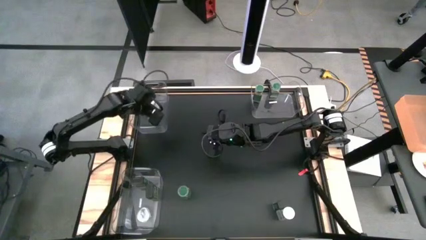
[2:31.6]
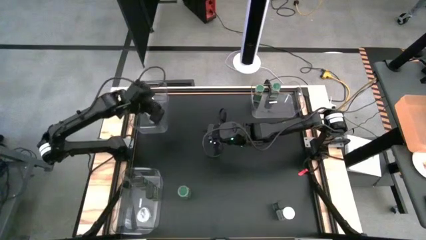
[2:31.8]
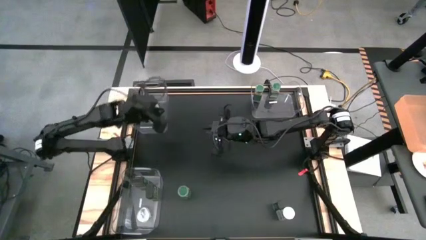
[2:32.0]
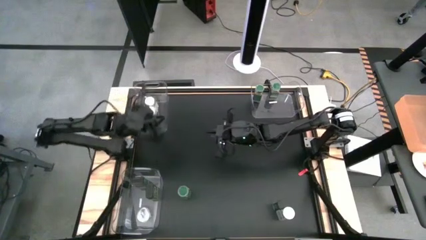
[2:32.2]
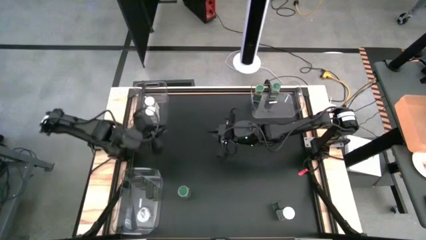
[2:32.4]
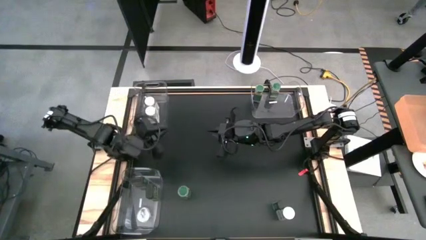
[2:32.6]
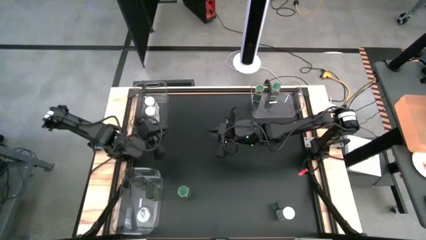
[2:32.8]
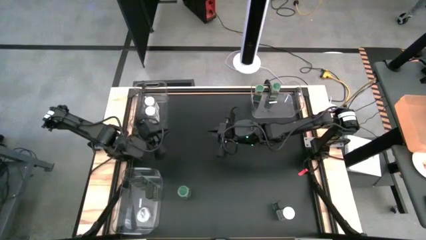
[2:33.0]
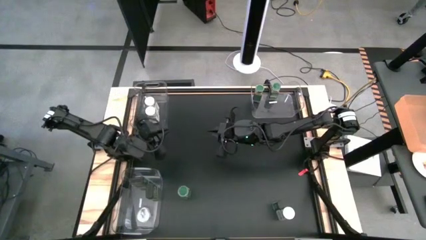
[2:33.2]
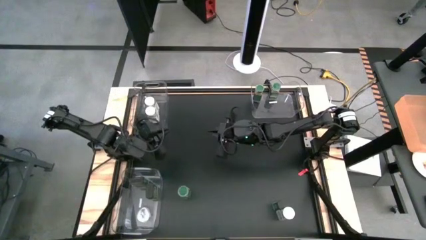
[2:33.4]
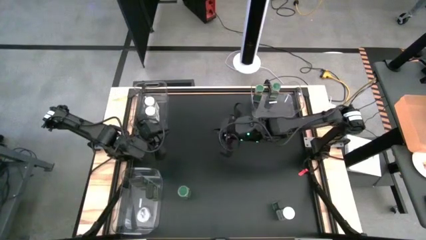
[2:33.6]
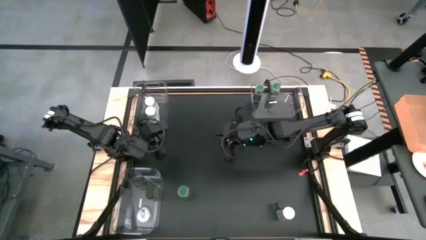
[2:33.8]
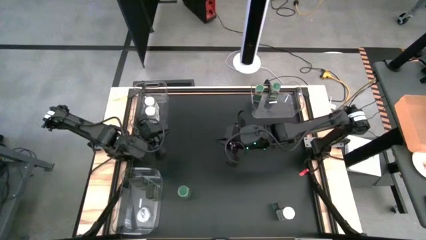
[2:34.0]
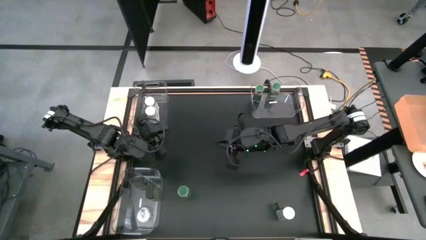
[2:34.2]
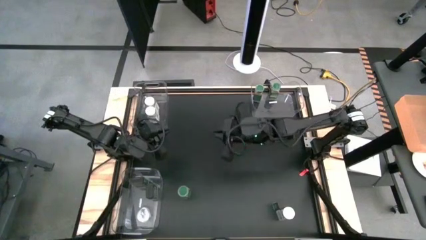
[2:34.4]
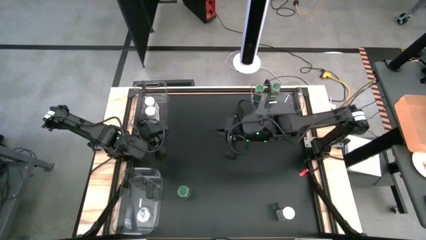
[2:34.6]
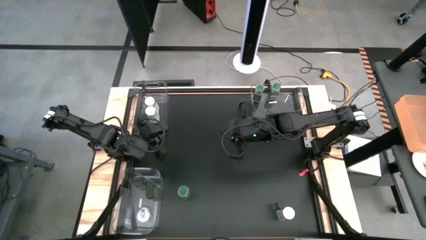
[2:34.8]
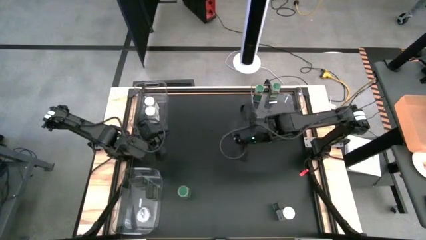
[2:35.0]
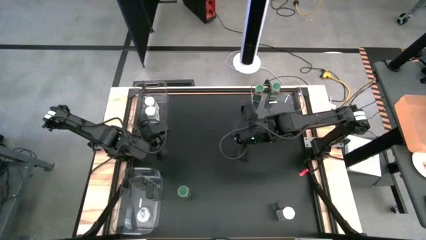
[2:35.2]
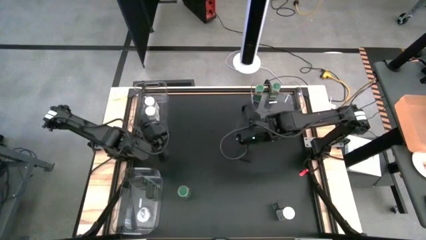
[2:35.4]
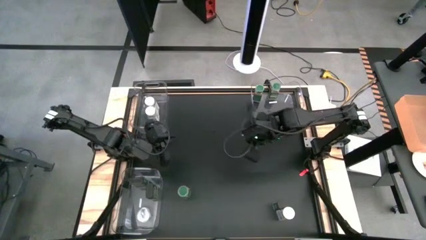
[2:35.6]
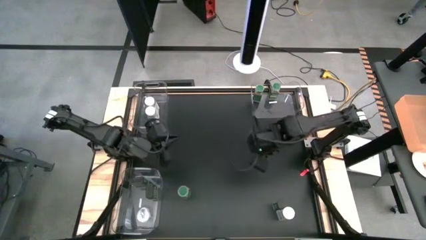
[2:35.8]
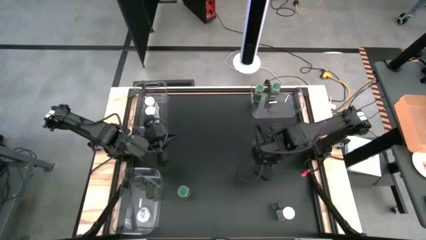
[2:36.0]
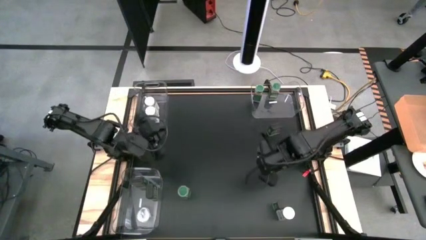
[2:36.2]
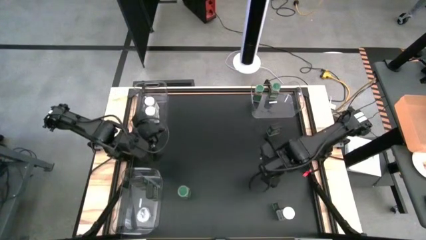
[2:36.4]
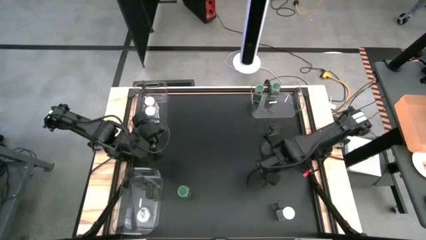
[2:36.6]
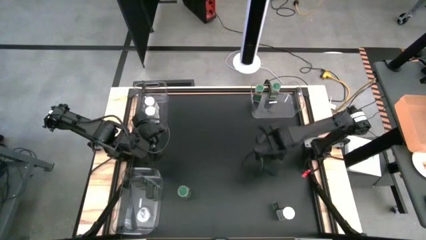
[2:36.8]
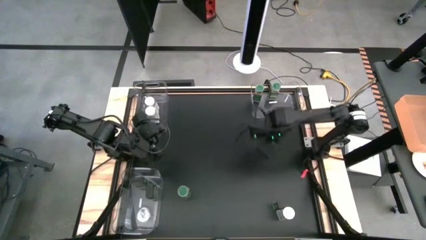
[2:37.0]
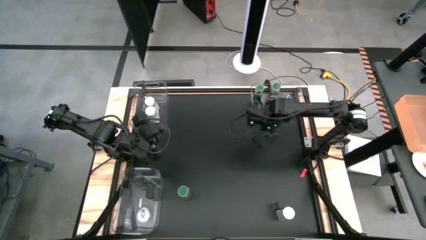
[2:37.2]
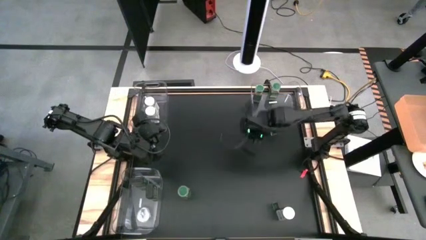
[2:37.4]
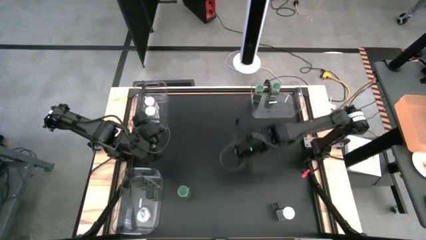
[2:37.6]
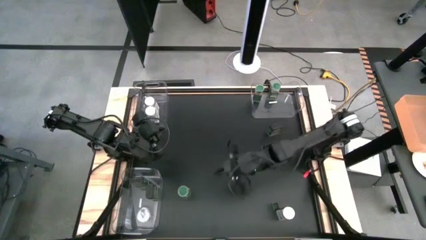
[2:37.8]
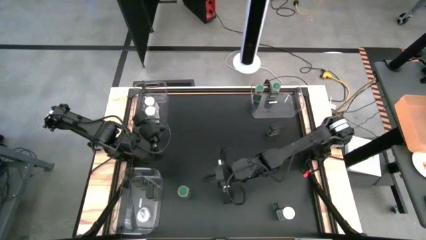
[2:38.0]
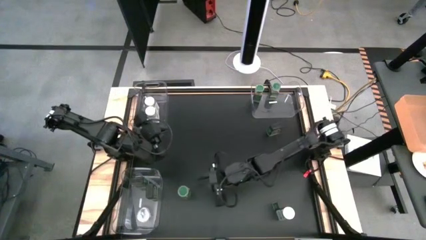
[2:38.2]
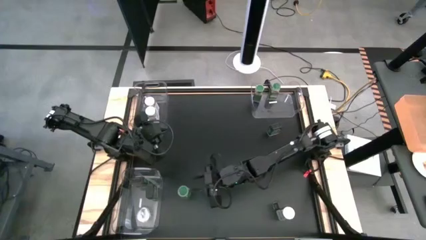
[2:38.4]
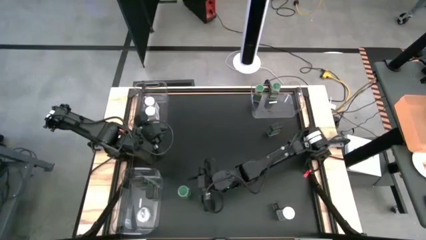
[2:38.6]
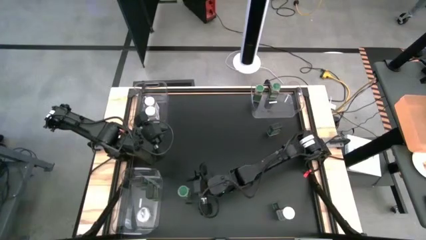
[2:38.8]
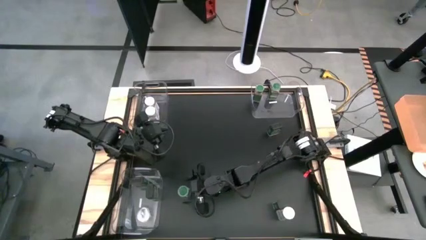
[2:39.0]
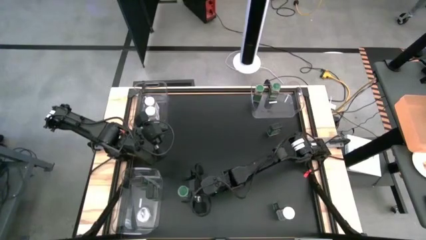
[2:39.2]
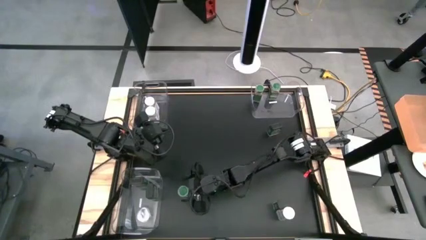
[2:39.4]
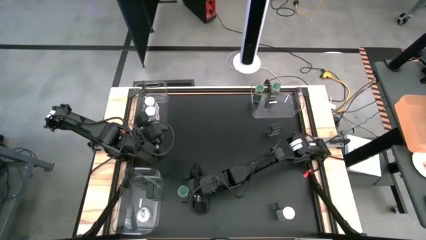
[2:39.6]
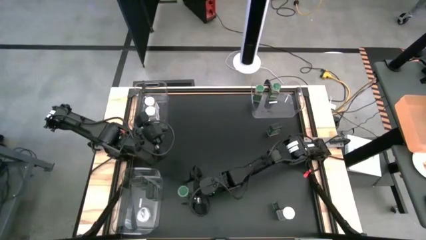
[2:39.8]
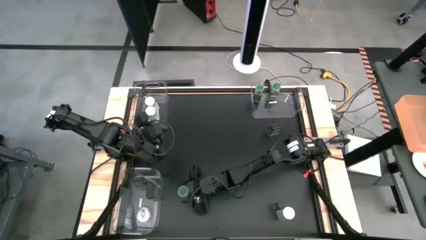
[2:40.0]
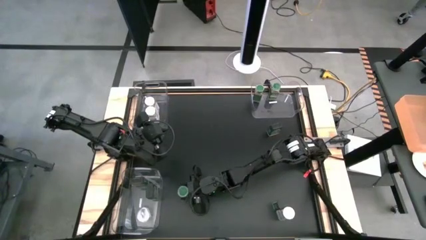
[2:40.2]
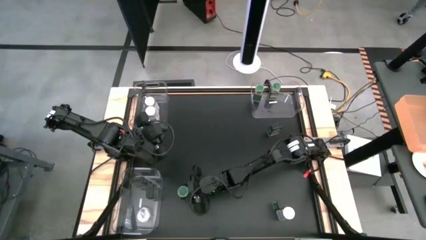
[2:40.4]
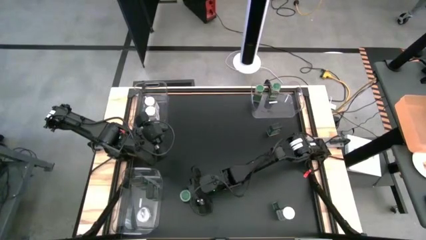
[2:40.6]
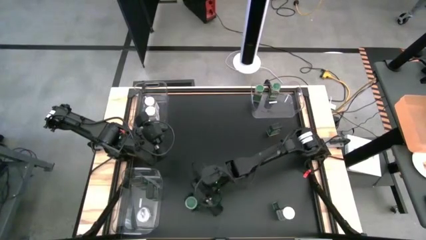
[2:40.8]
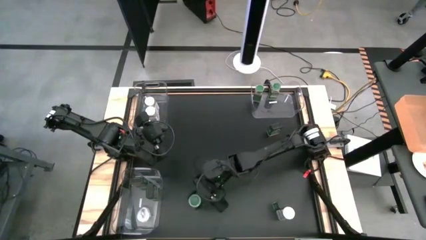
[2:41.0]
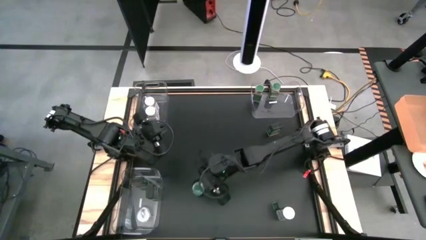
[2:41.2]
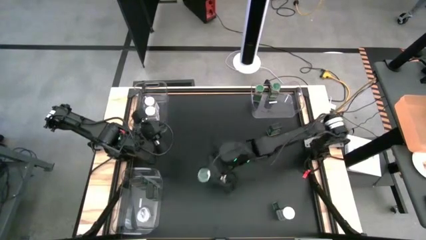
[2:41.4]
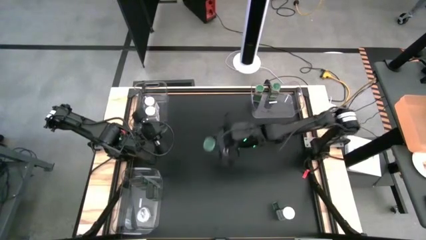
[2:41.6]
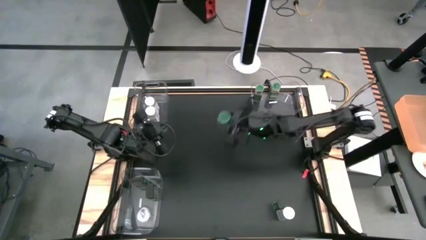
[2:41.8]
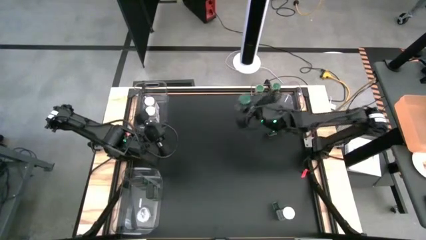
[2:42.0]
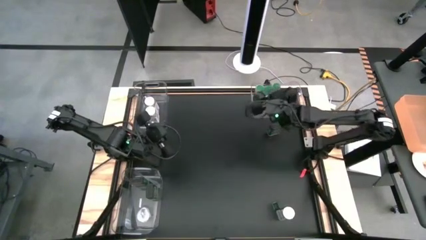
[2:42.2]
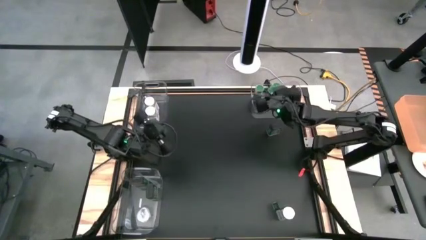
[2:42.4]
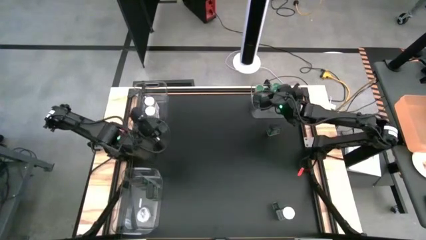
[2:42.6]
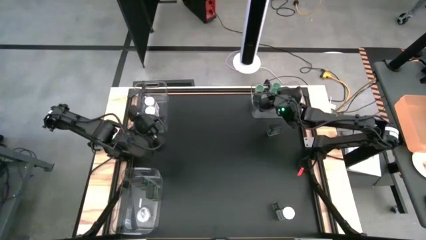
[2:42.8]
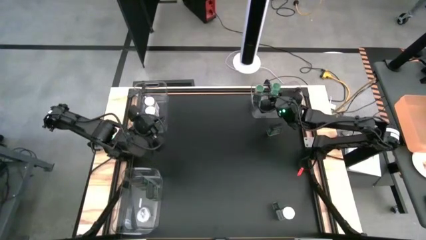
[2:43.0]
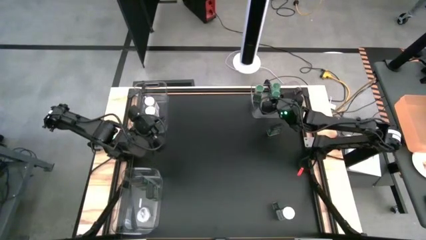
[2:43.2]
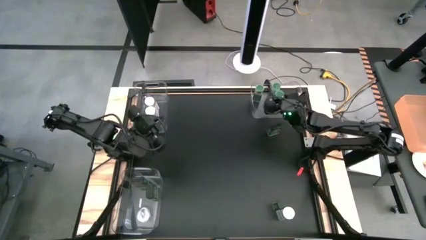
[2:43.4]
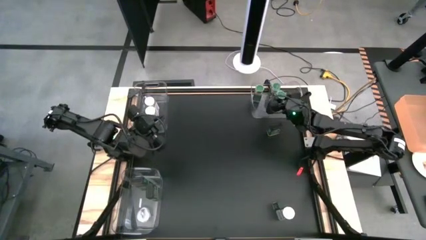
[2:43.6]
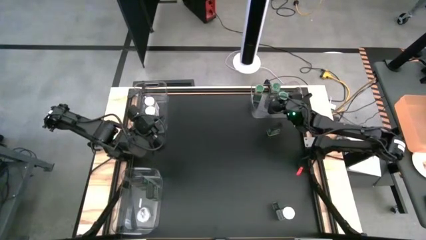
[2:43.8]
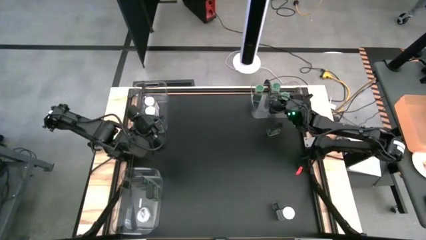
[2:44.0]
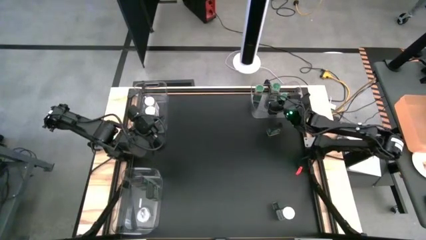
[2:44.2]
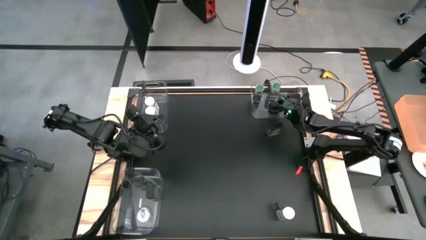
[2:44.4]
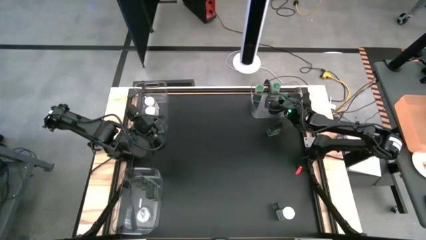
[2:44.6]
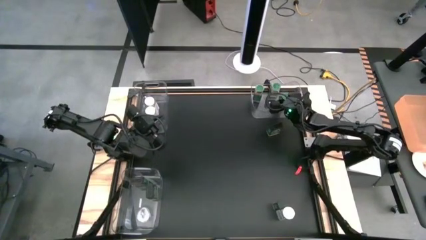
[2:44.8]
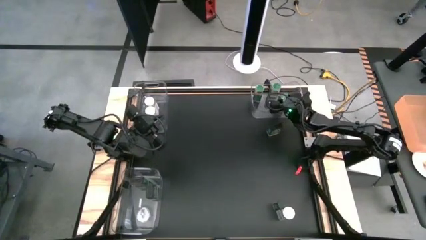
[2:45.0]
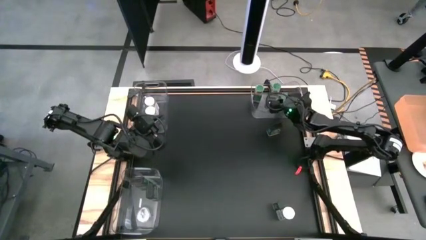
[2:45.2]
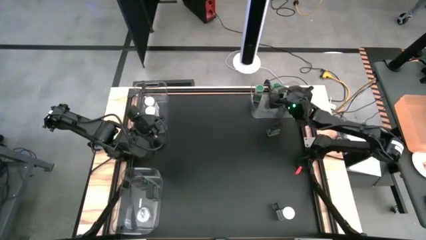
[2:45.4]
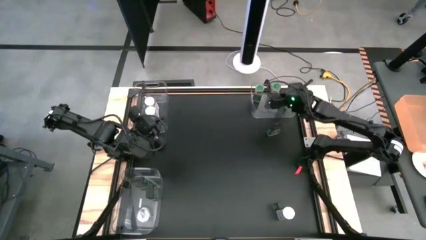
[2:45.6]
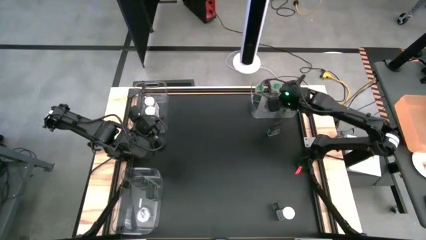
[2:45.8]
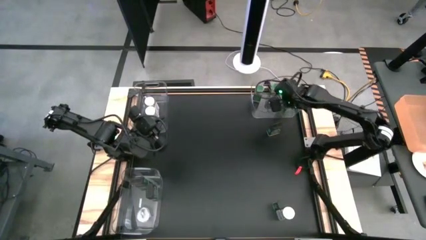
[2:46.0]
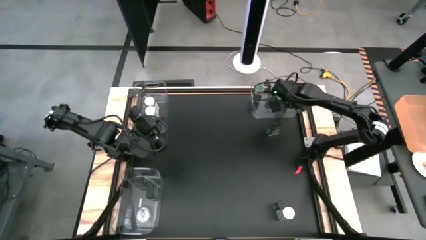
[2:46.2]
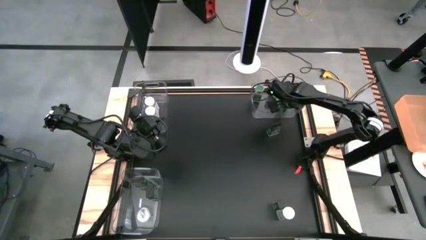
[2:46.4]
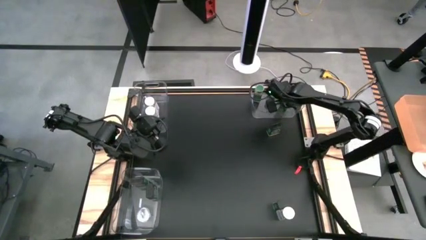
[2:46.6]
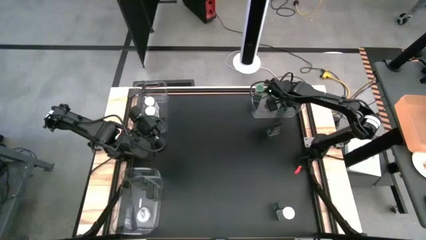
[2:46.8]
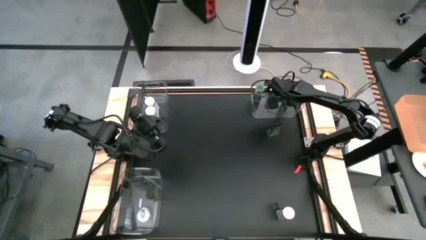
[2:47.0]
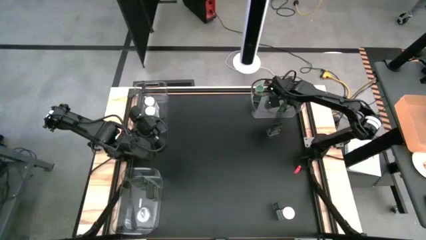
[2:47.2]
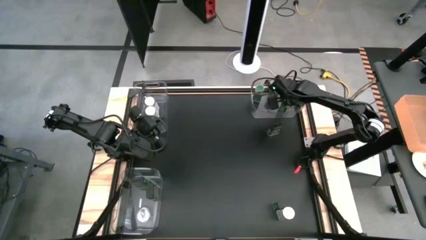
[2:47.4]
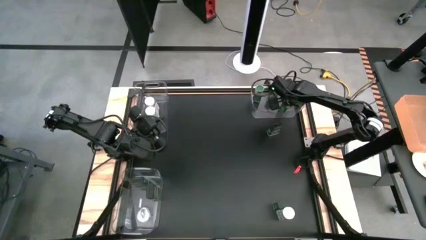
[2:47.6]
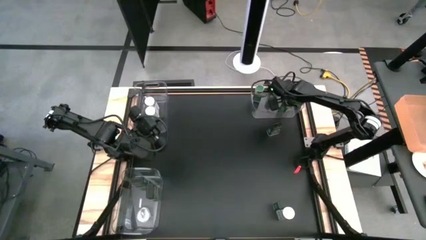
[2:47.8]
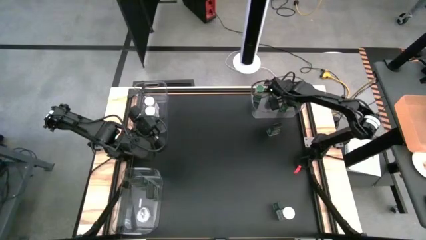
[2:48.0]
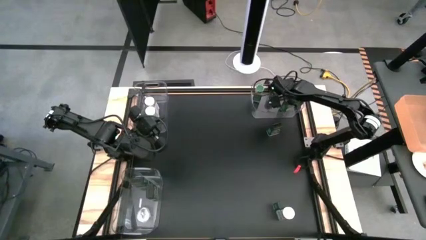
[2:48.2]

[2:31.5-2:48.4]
Task: Sort spices by type
Put the green seasoning bottle into the top right transparent bin
